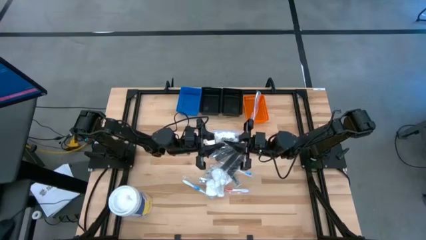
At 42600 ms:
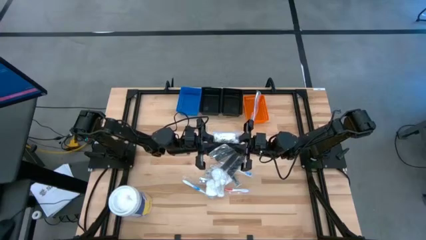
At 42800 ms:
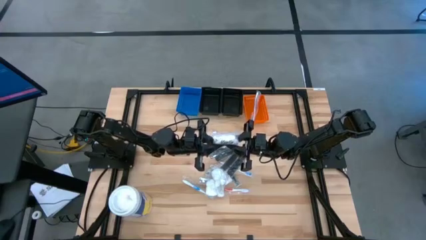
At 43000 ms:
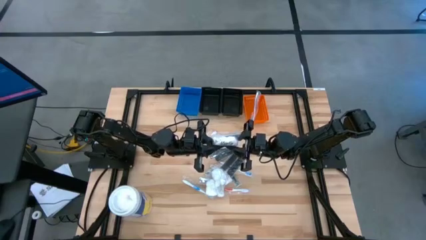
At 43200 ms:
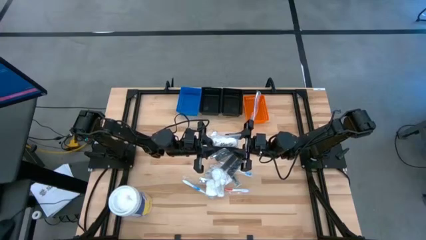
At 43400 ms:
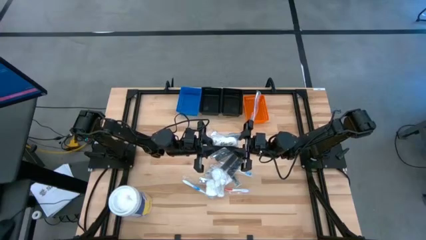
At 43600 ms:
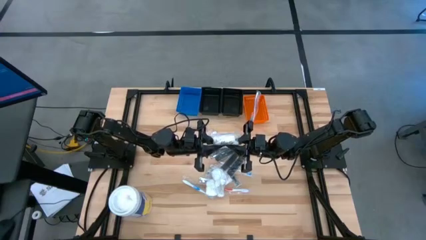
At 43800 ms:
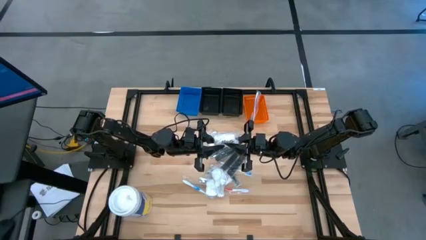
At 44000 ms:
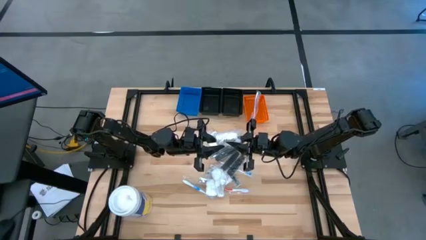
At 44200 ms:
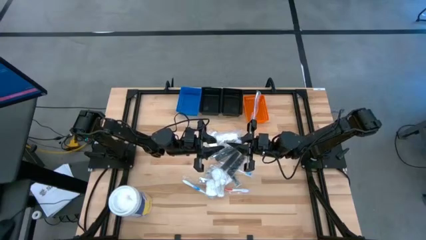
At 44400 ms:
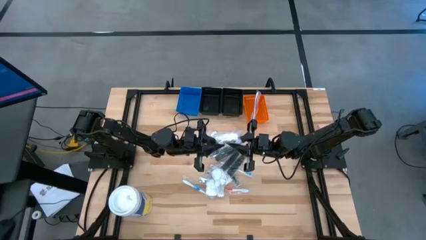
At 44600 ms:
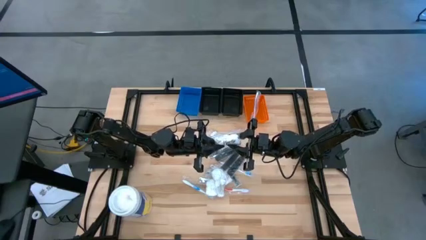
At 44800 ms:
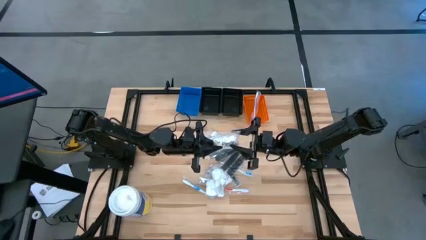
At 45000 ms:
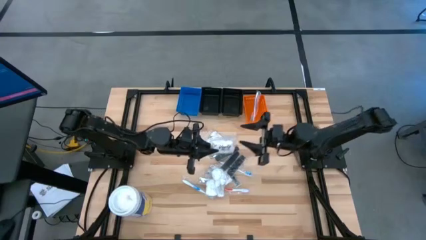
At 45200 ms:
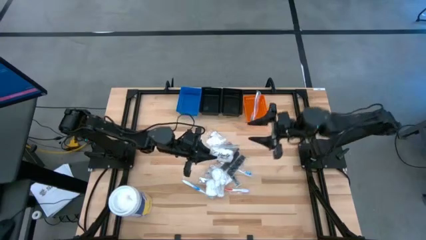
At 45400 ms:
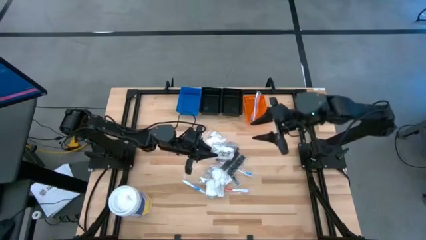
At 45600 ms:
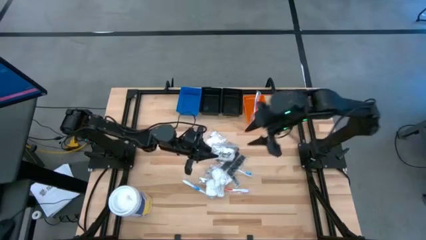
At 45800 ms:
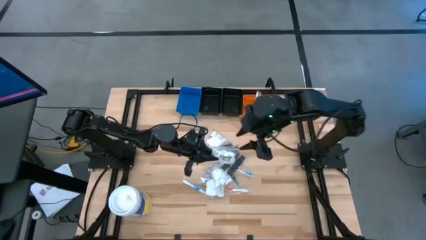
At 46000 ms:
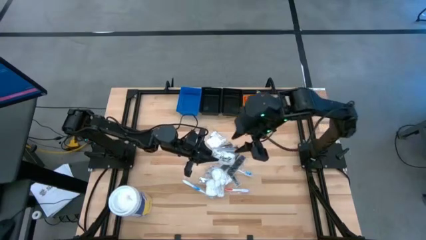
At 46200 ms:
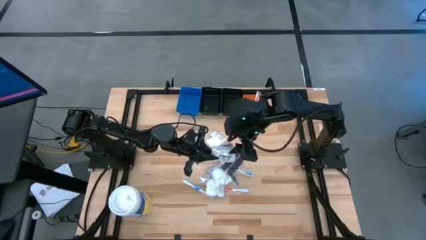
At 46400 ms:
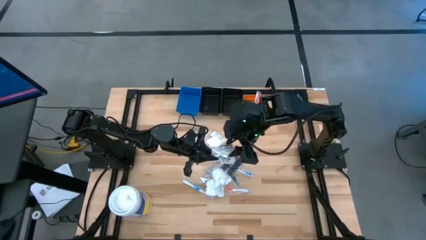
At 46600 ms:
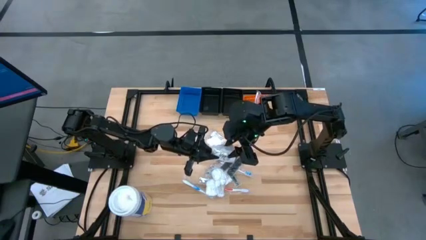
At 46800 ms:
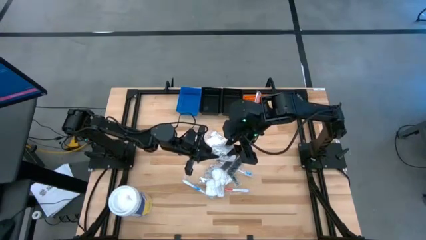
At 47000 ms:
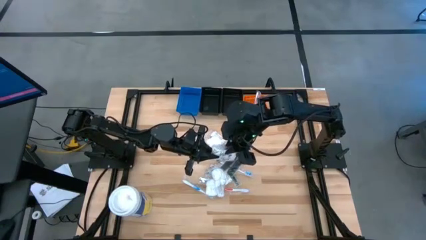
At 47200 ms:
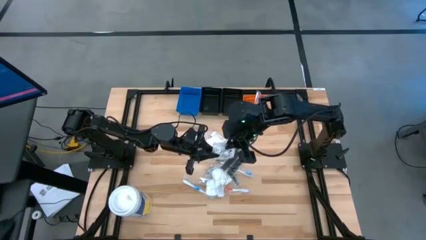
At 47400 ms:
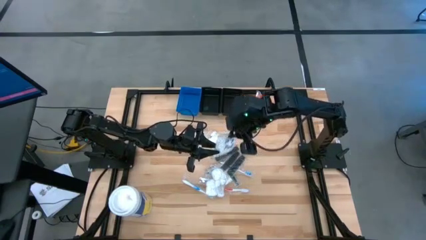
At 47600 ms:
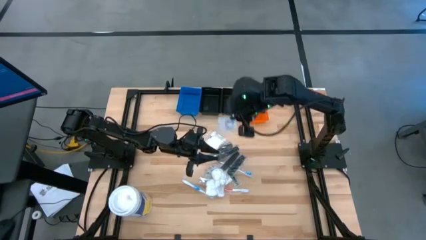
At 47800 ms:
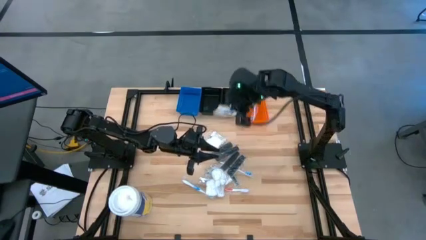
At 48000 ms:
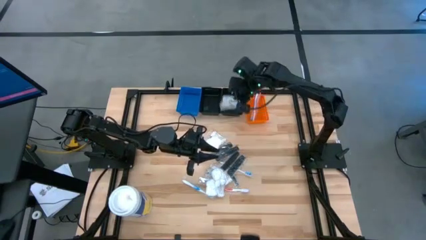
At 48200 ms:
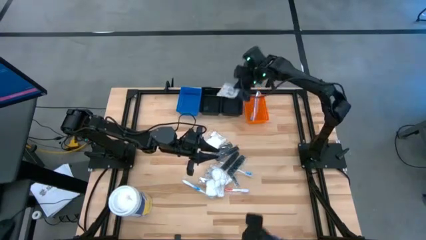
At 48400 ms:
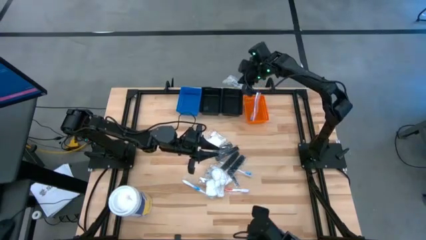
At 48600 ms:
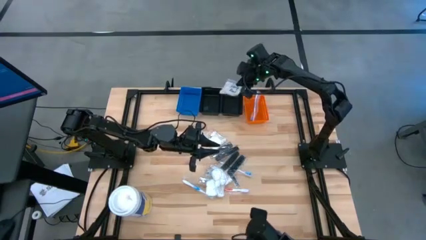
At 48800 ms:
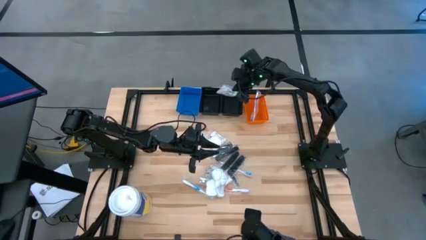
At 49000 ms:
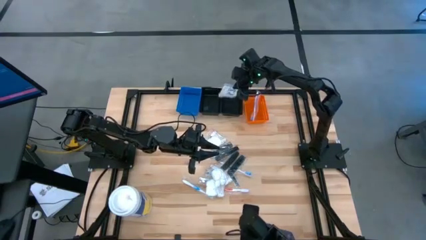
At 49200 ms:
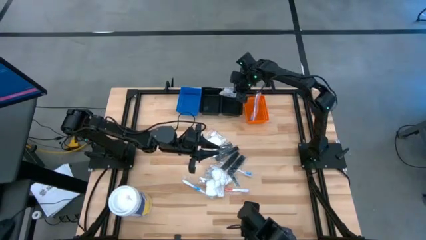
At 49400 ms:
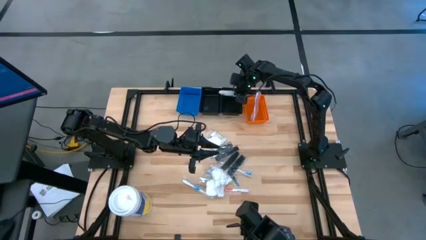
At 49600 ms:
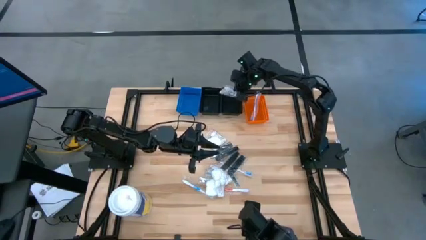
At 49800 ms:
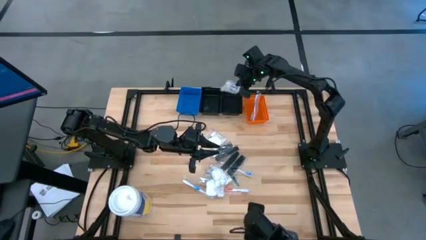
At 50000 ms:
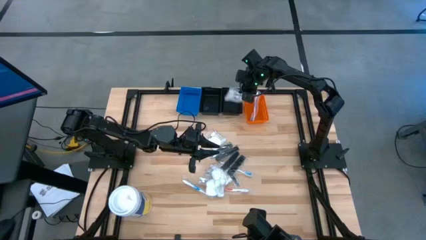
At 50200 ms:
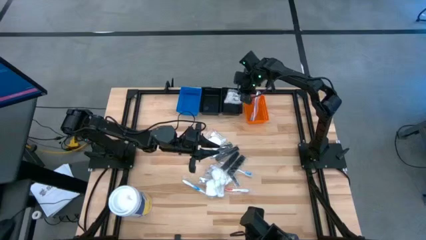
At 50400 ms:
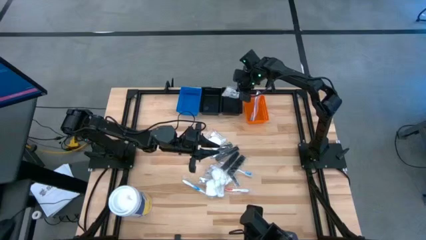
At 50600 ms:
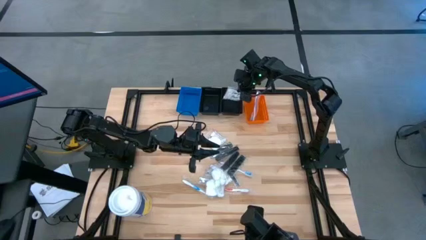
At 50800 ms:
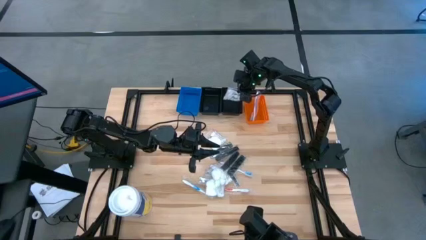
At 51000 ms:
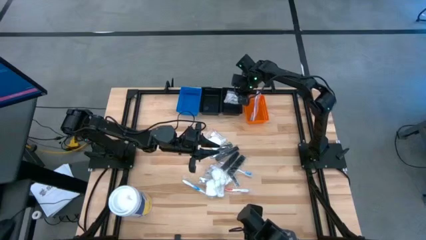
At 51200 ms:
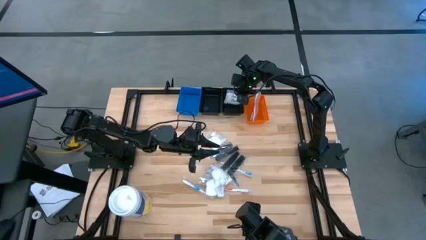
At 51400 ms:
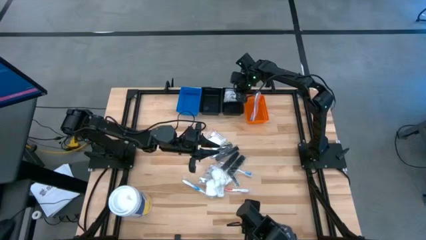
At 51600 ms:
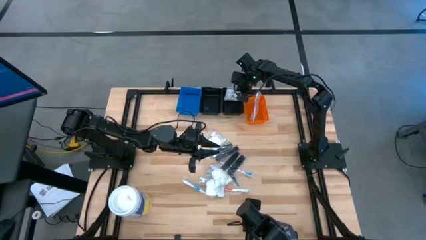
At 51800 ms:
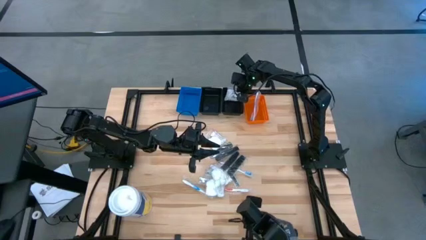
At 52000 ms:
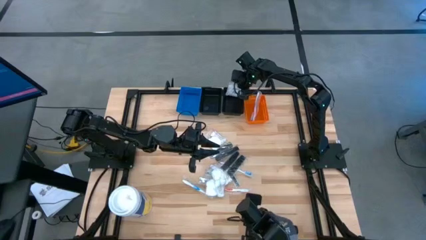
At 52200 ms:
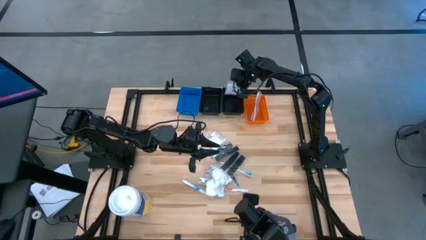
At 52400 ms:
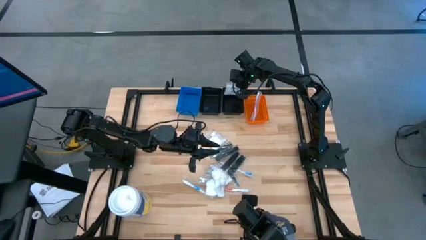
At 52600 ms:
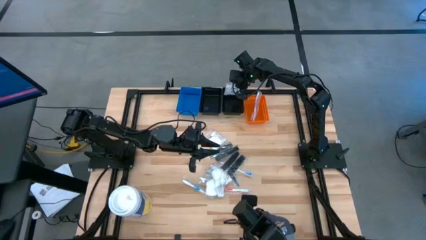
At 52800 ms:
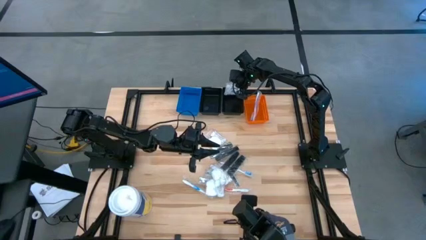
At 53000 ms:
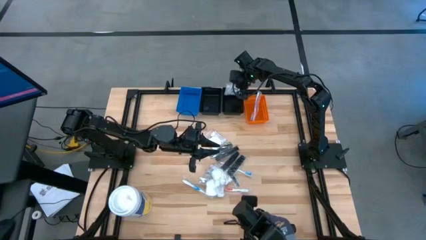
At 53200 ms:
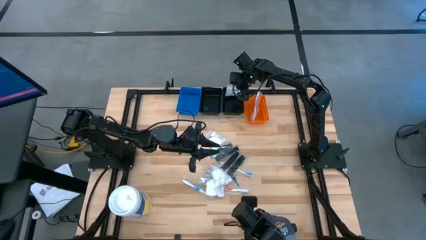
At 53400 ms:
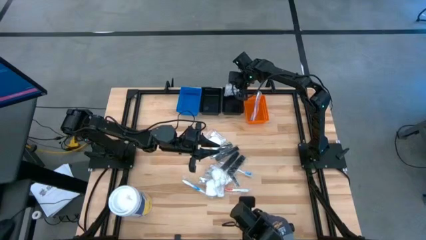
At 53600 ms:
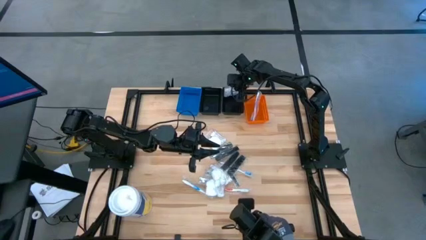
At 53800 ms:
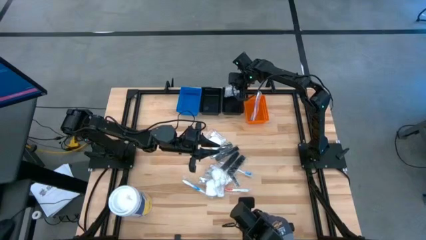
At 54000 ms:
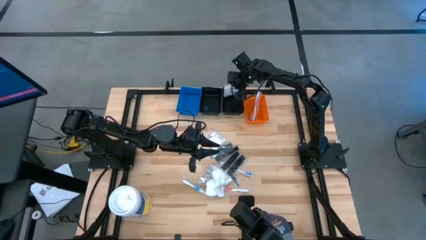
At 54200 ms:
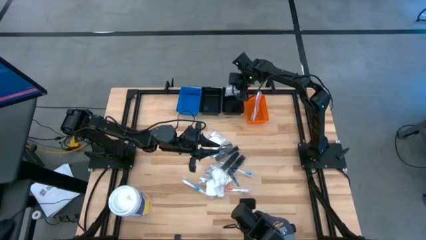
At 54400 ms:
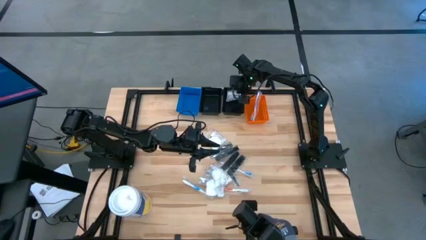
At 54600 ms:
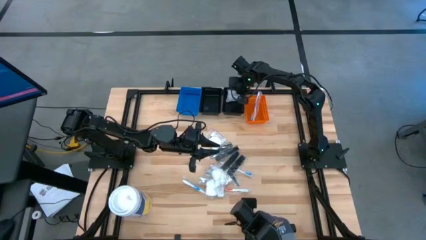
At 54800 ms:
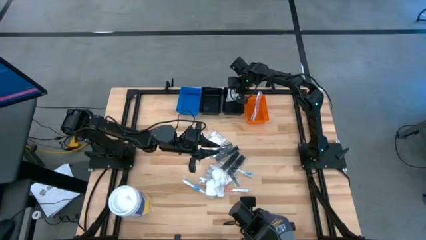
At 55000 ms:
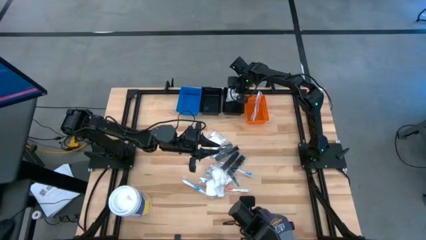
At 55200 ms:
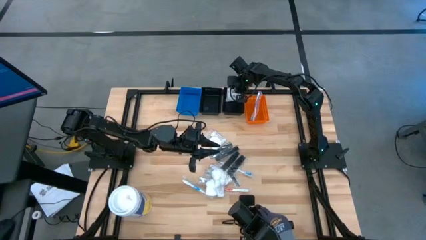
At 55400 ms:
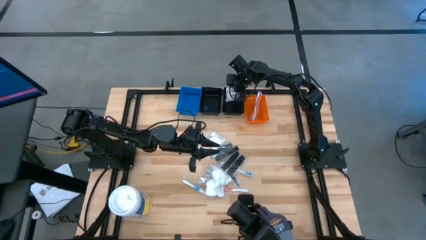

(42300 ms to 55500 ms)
Task: Pick & Place Travel size toiletries
Put the white vanity pack into the right black bin

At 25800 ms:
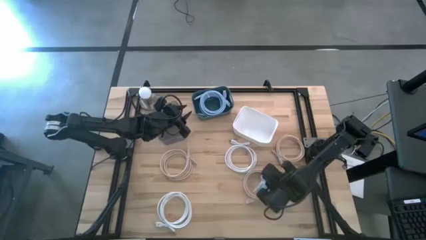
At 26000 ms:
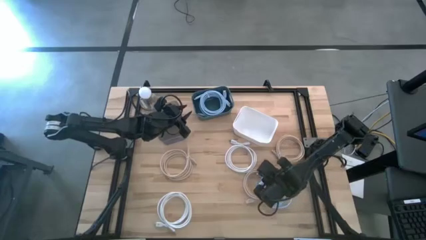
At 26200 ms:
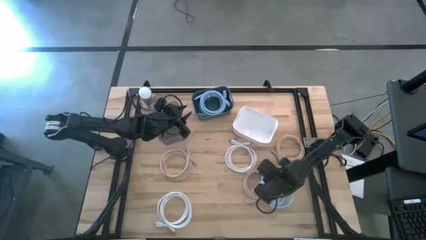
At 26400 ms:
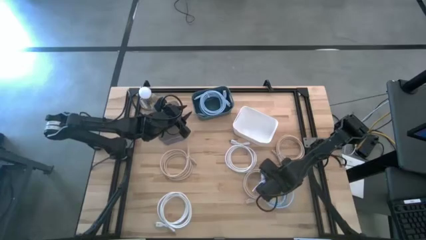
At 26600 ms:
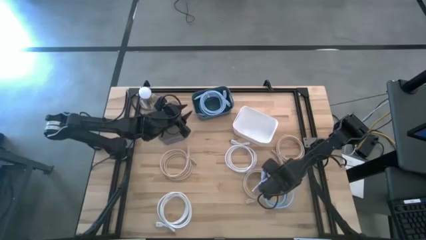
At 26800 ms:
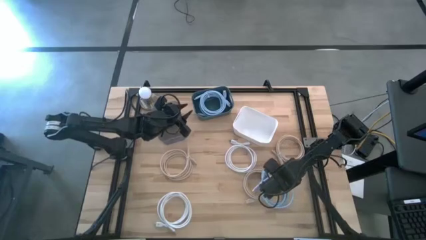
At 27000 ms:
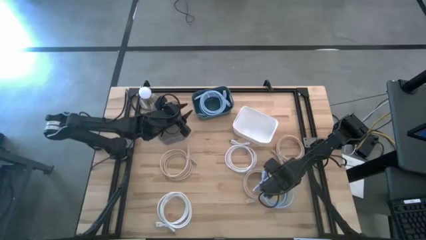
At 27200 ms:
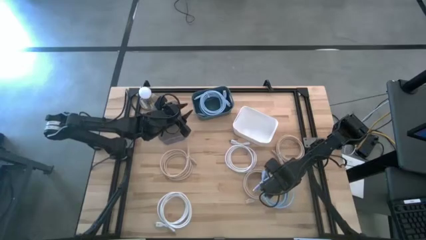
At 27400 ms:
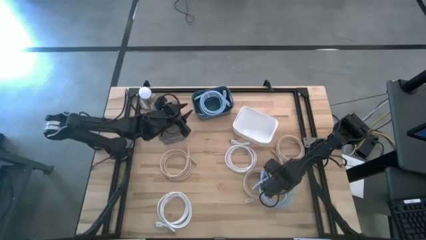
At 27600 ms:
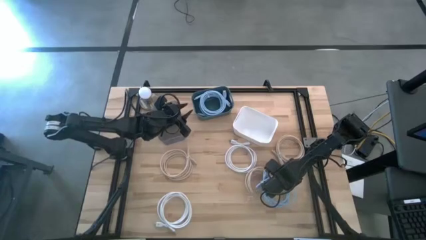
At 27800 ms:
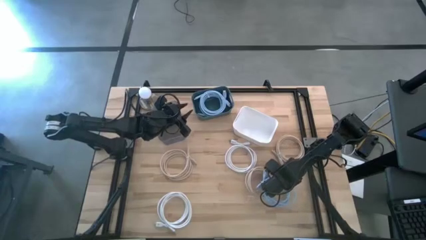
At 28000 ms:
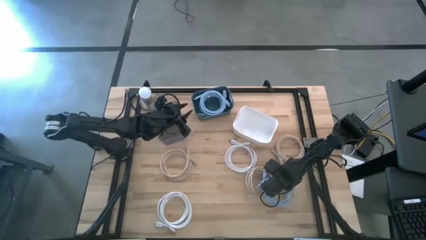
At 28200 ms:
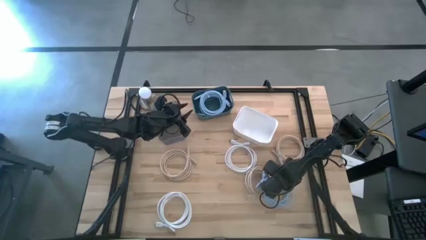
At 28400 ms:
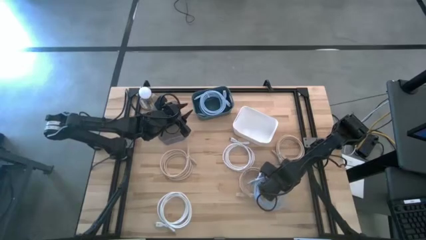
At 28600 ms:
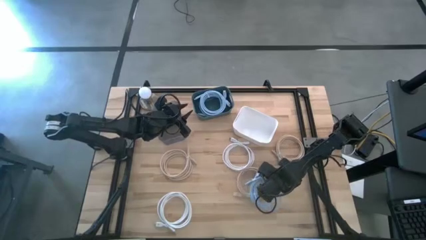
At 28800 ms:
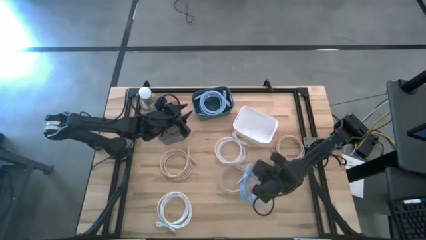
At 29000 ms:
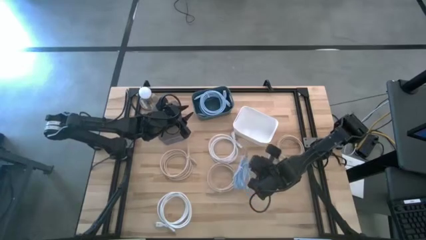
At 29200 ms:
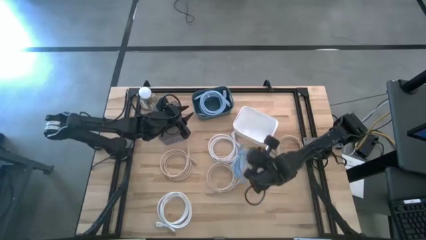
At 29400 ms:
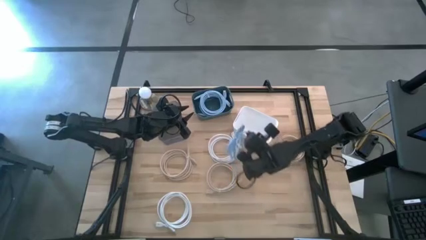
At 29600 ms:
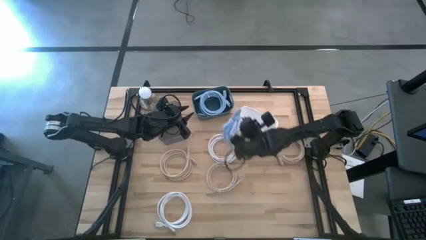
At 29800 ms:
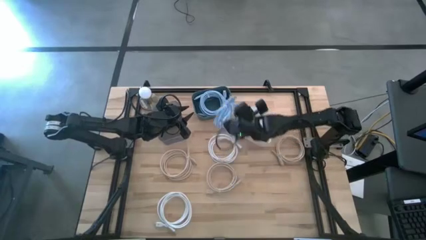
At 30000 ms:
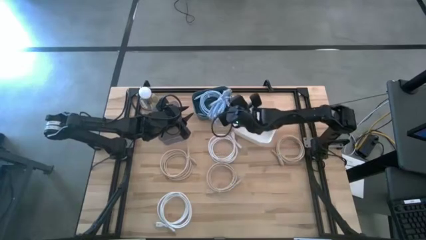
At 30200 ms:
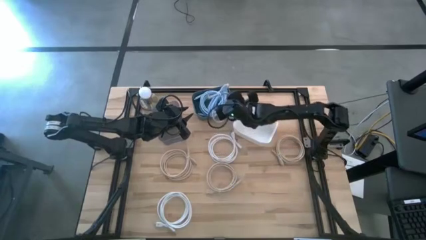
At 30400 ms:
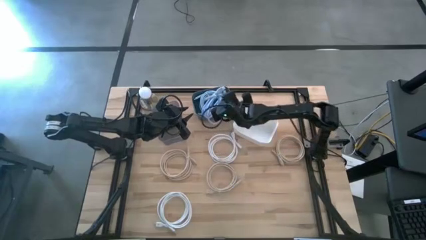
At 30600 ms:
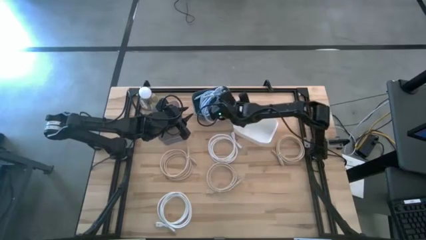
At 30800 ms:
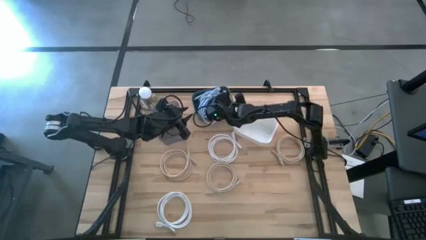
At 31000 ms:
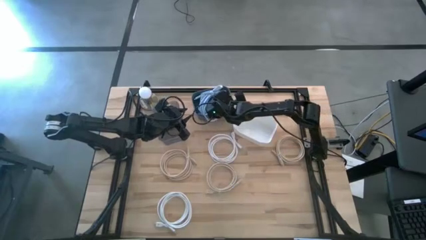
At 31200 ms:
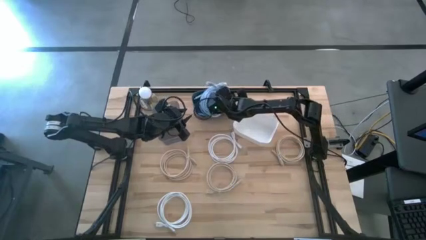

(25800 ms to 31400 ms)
Task: Sort HDMI cables
Put the blue HDMI cable into the blue bin
